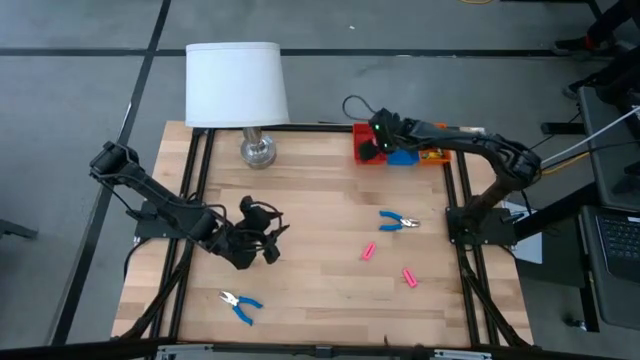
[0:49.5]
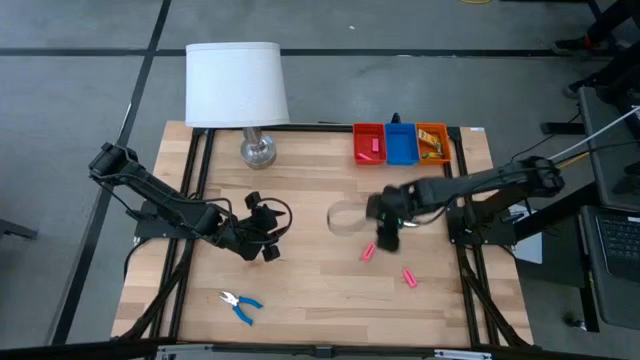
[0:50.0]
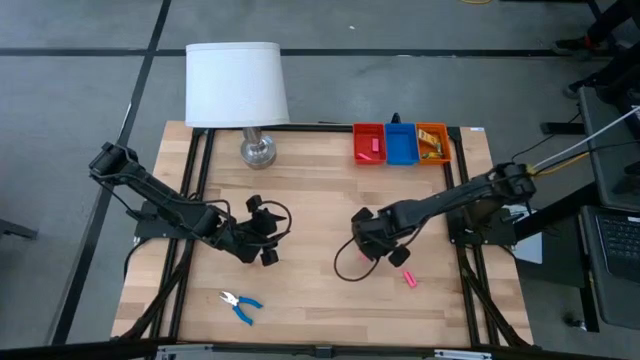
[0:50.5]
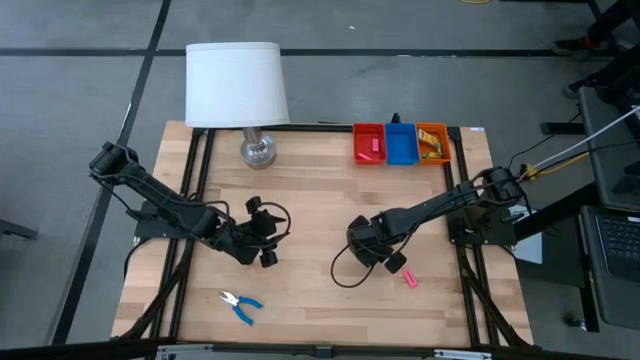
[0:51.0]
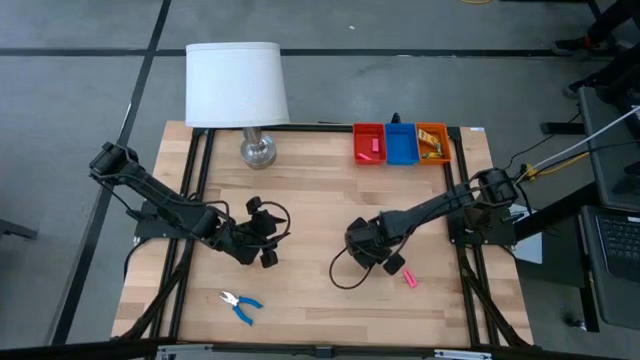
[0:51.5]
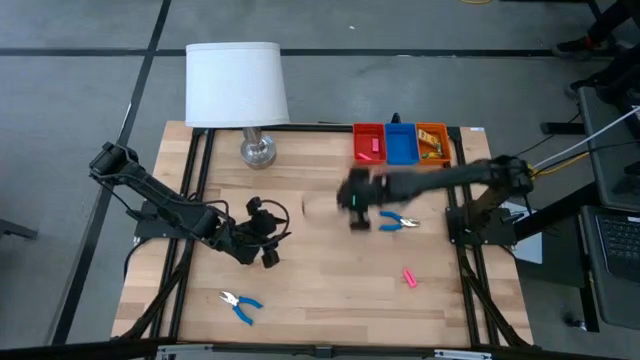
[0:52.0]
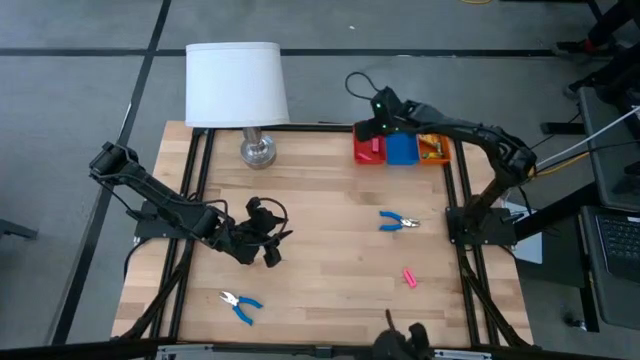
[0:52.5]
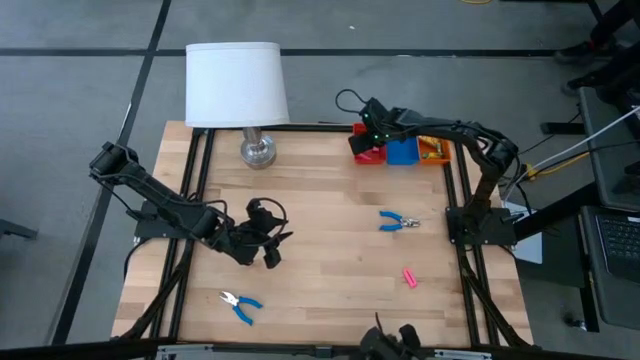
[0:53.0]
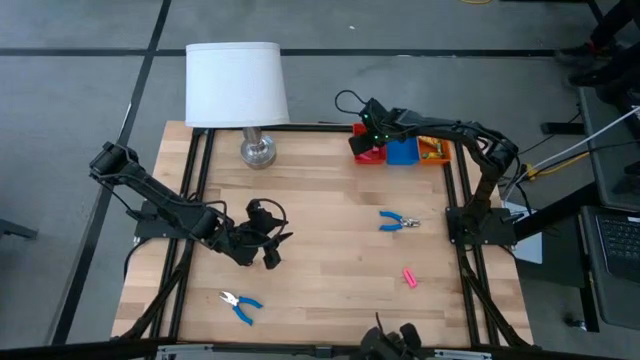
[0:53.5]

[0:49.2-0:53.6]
Task: Pick & Place School Supplies
Put the pink eraser into the red bin

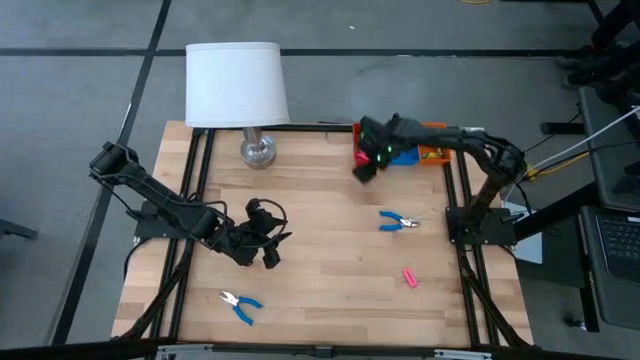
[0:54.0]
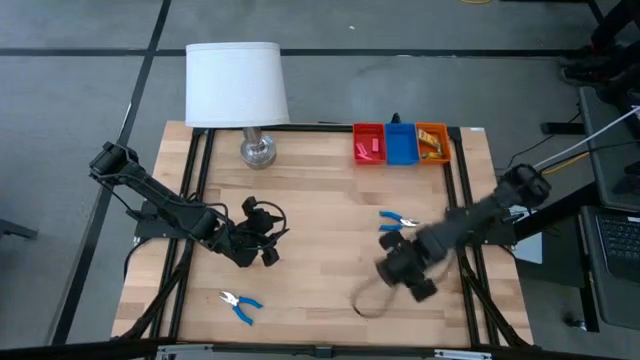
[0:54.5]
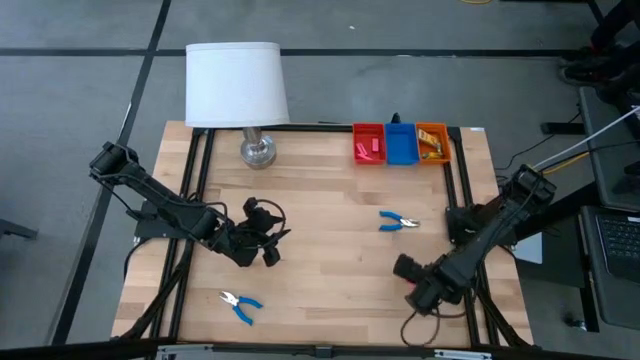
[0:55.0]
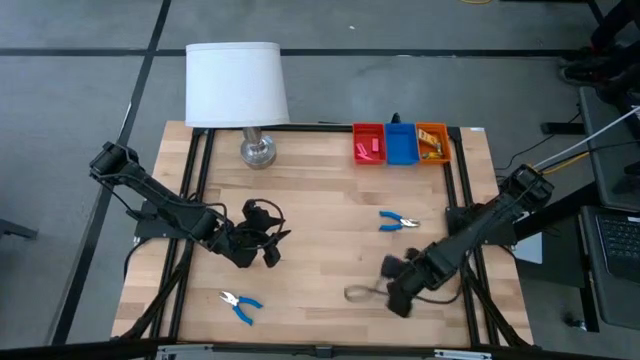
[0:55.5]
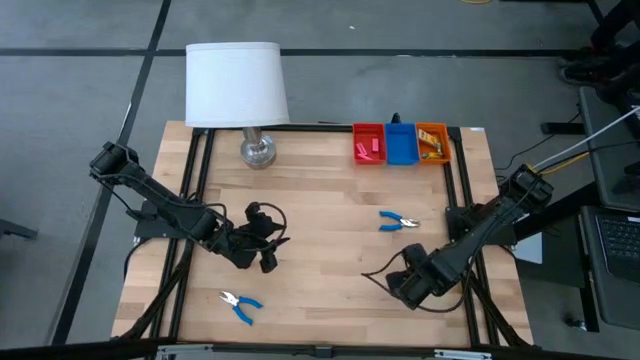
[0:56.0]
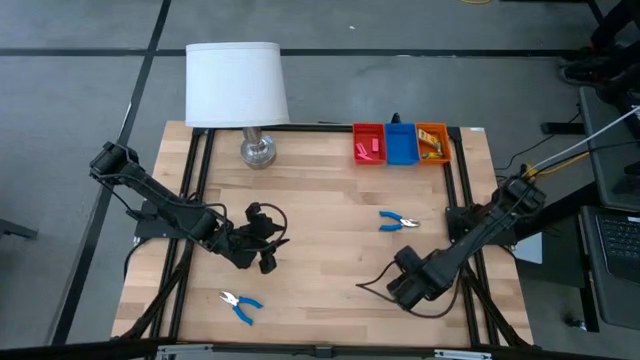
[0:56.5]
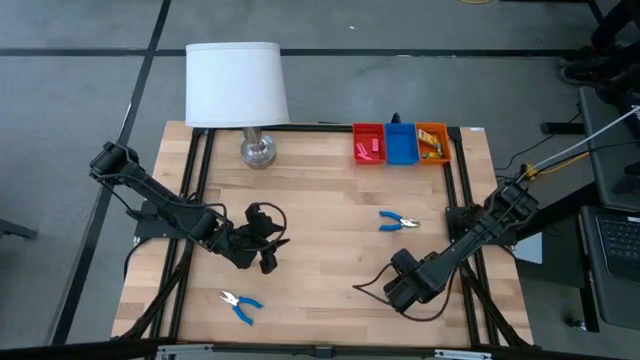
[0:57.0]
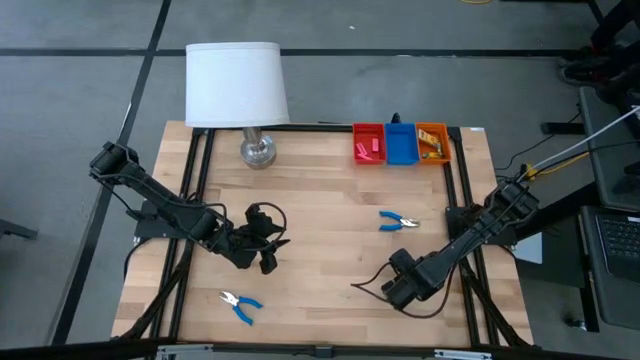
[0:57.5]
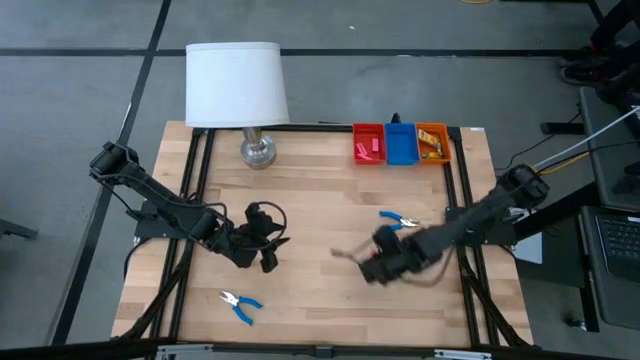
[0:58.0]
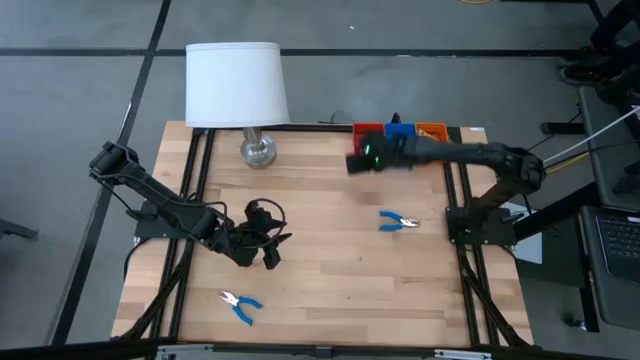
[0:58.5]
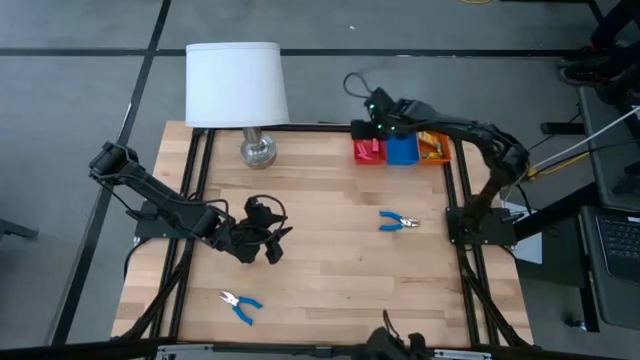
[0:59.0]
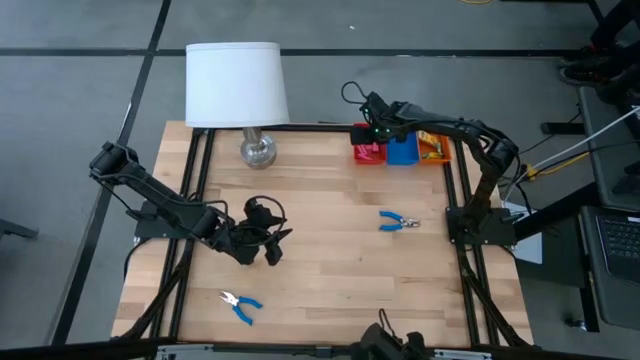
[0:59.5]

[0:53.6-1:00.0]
Put the pink eraser into the red bin

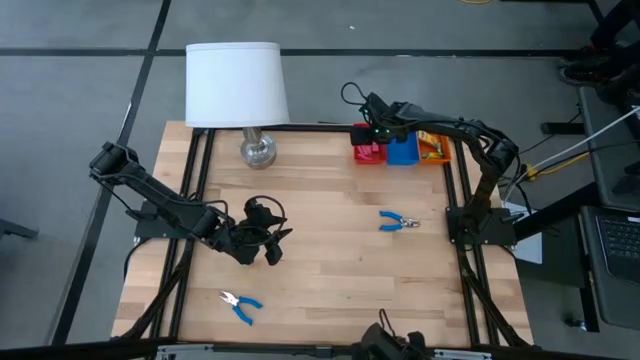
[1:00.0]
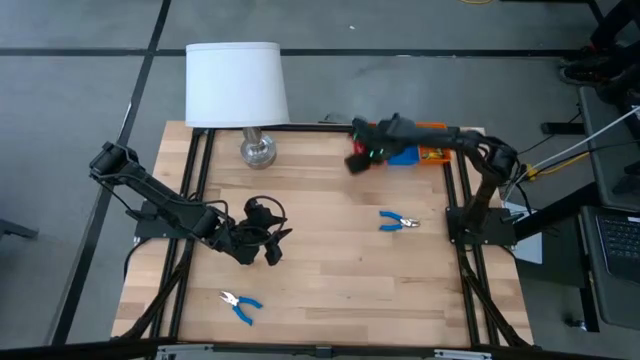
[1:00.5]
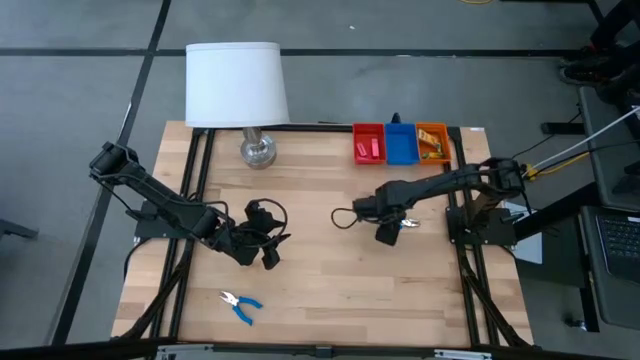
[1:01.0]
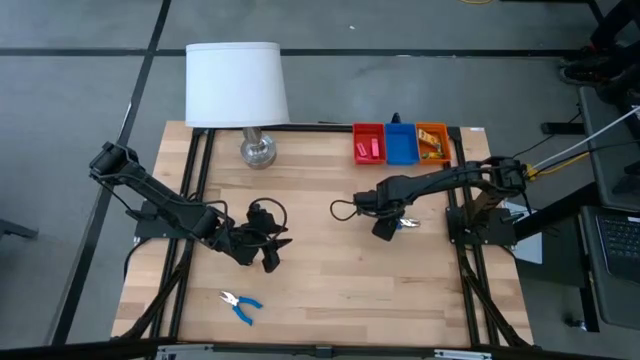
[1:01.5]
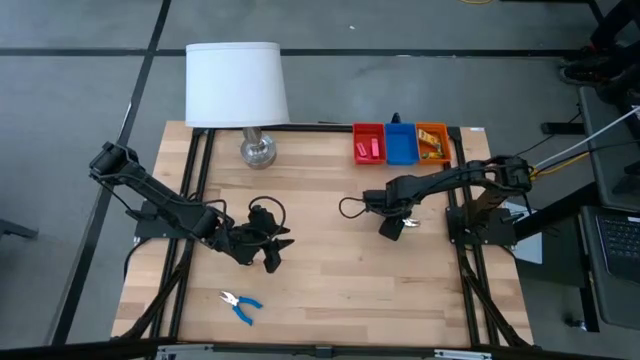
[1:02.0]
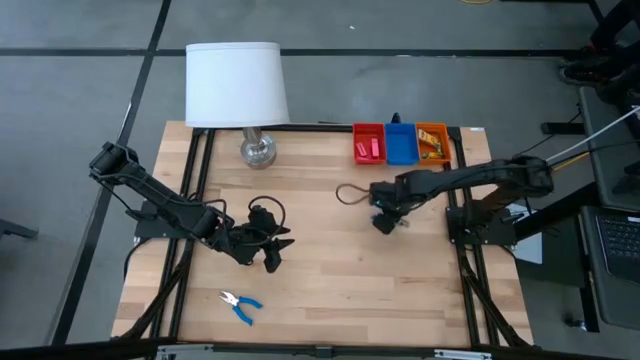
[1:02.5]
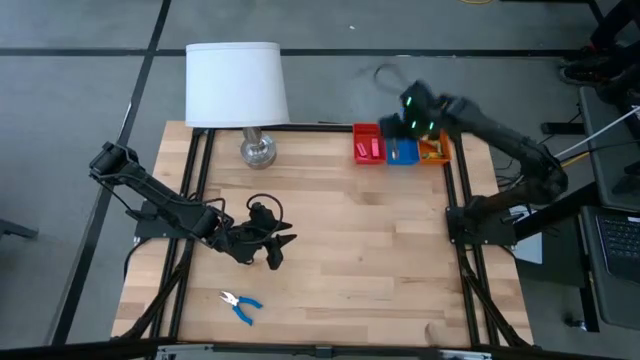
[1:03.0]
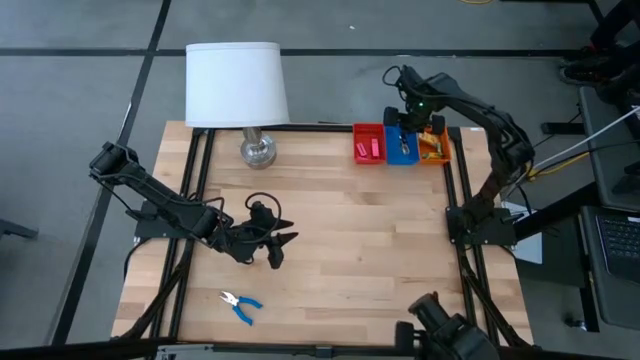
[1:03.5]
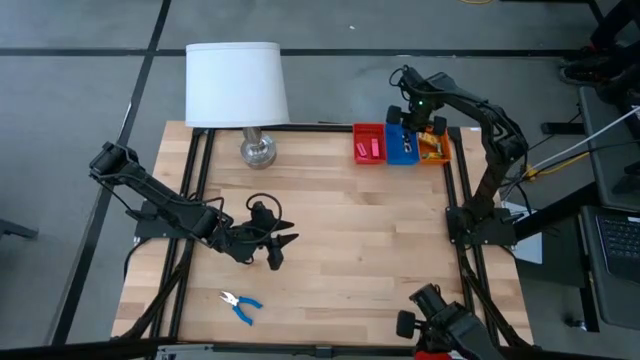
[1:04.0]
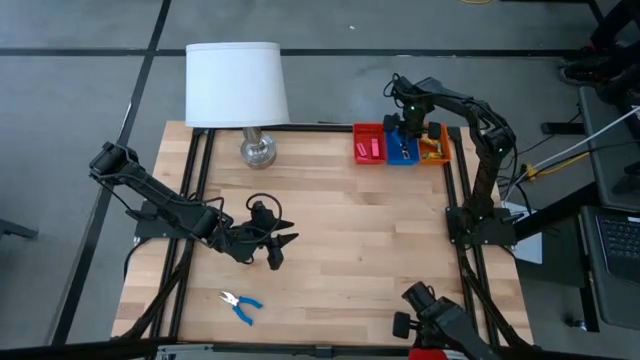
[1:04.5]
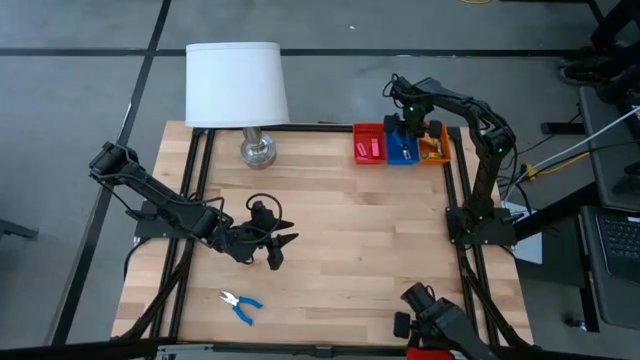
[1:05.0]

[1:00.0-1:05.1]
Put the top blue hole puncher into the blue bin

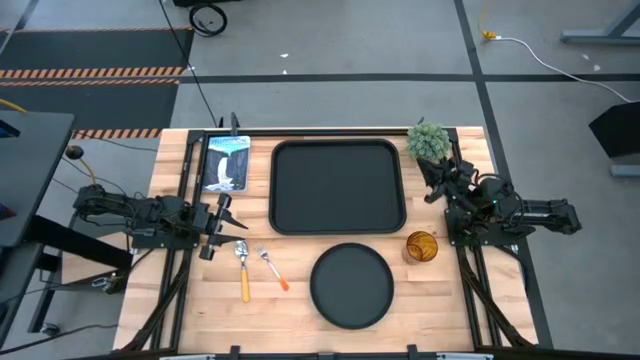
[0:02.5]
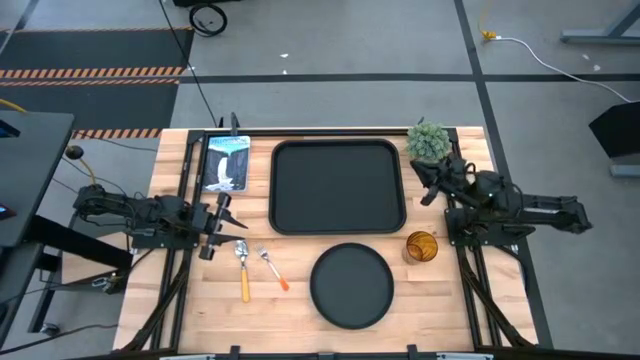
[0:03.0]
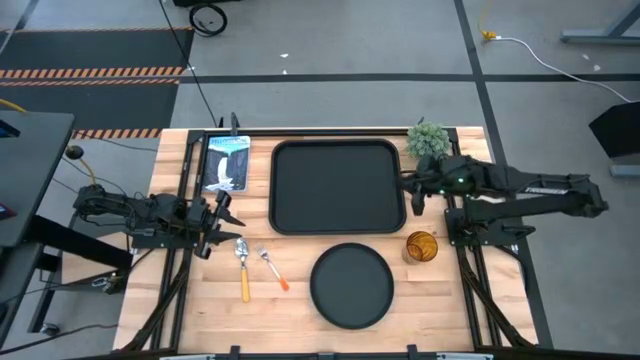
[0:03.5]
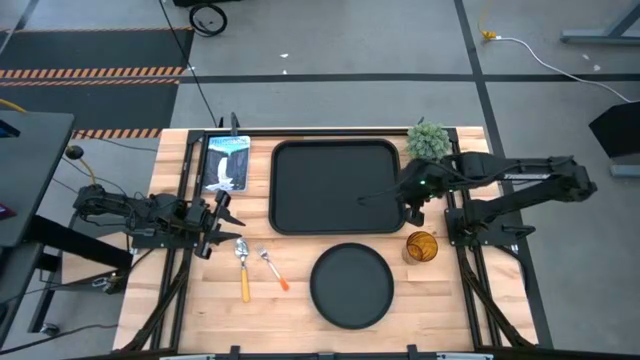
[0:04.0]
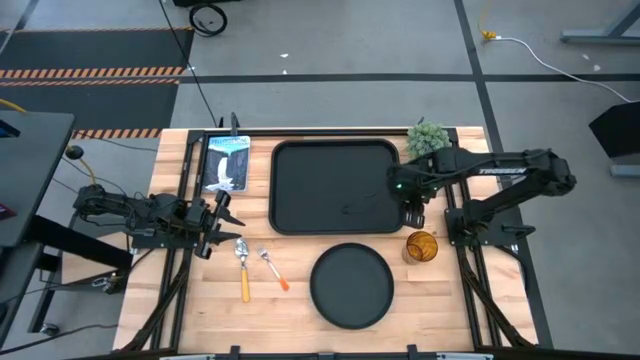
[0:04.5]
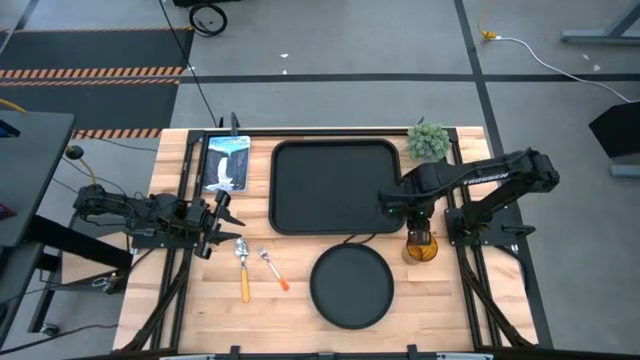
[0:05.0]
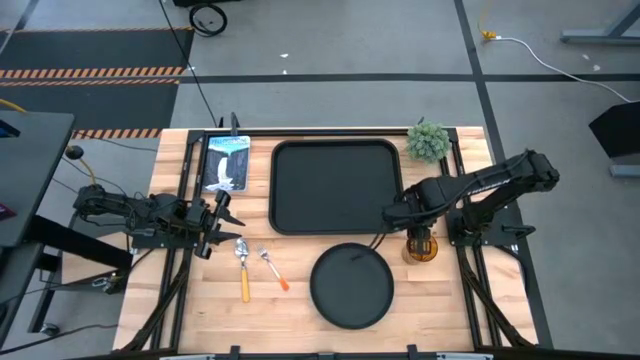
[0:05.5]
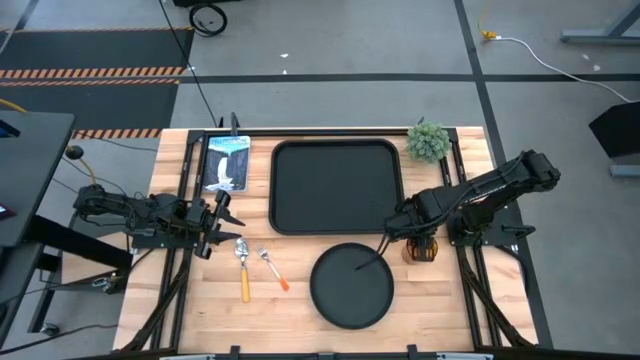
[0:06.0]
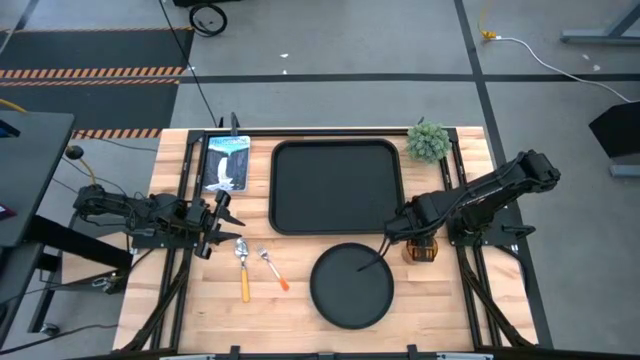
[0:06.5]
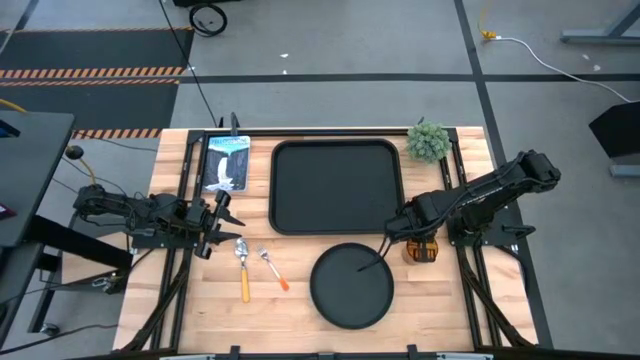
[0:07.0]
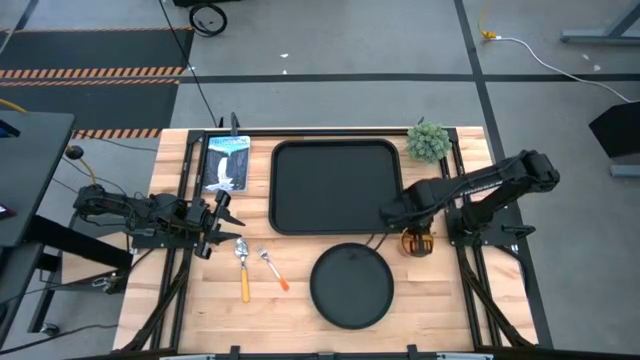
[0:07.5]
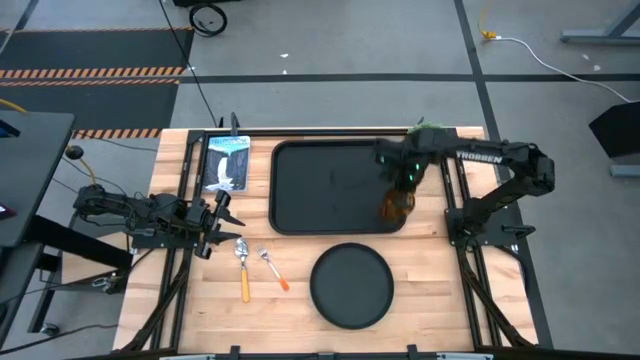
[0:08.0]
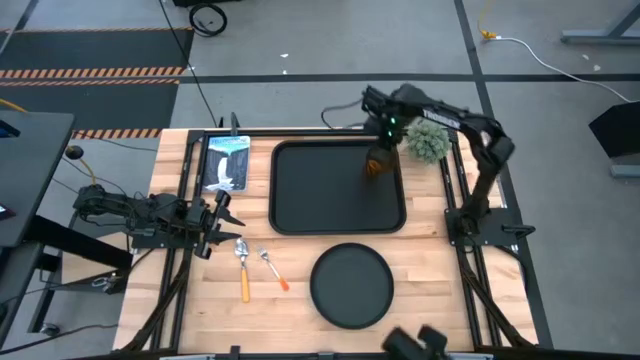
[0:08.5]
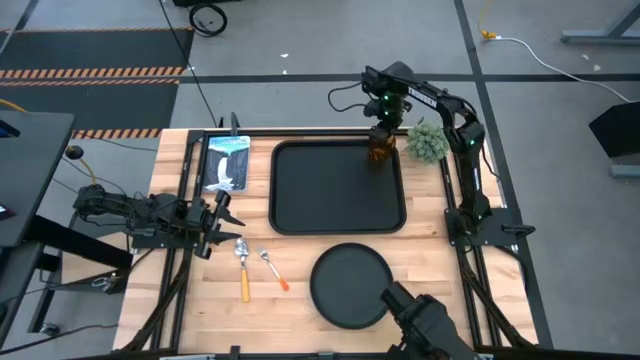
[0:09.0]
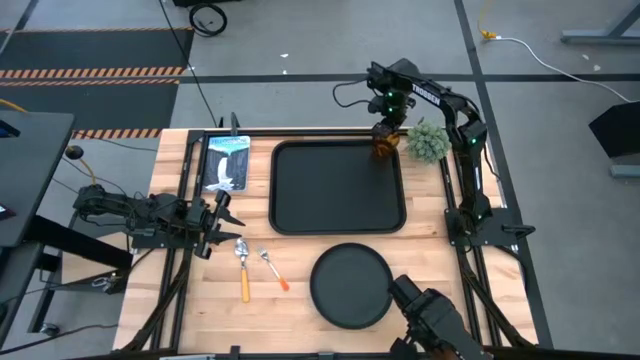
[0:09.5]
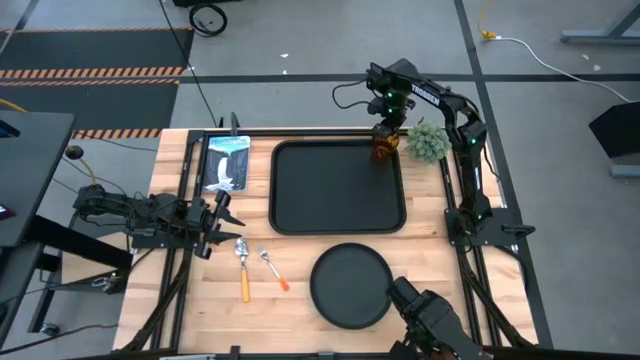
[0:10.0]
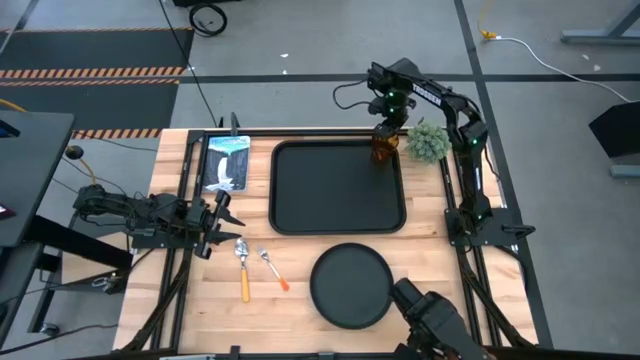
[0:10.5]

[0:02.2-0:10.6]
Task: Pick and place plate/cup/fork/spoon on tray
Put the brown cup on the black tray
